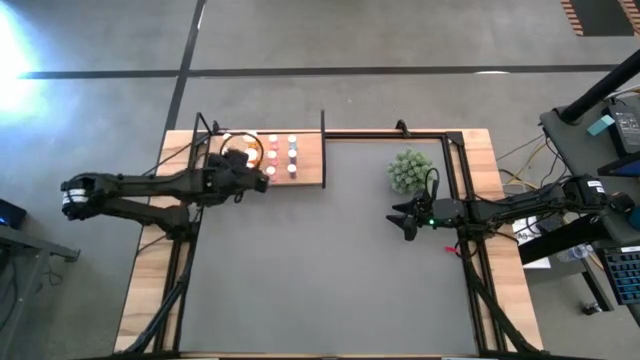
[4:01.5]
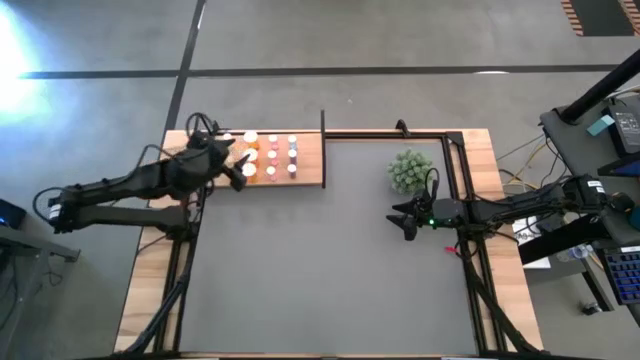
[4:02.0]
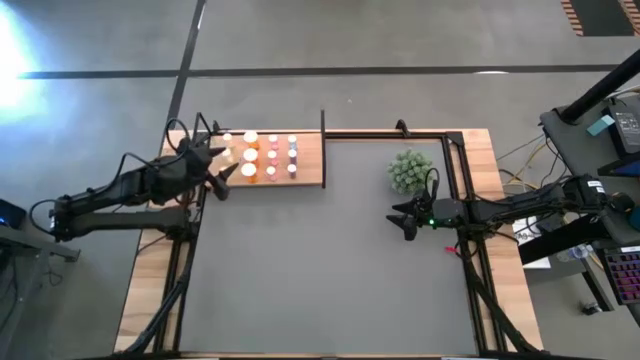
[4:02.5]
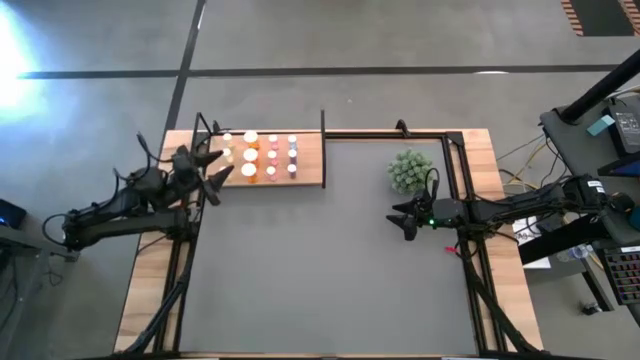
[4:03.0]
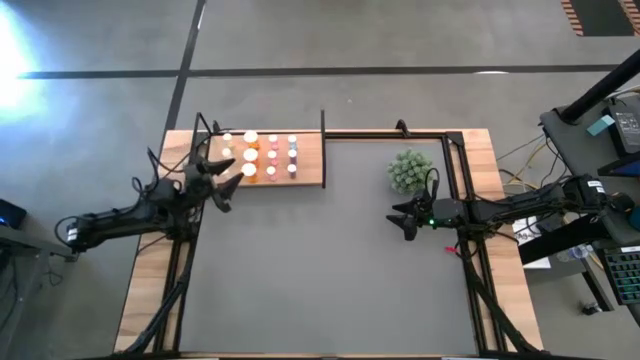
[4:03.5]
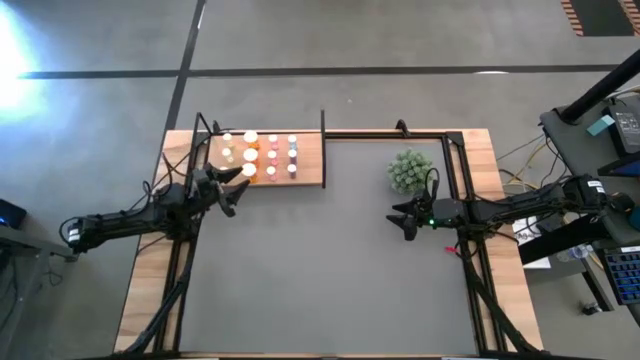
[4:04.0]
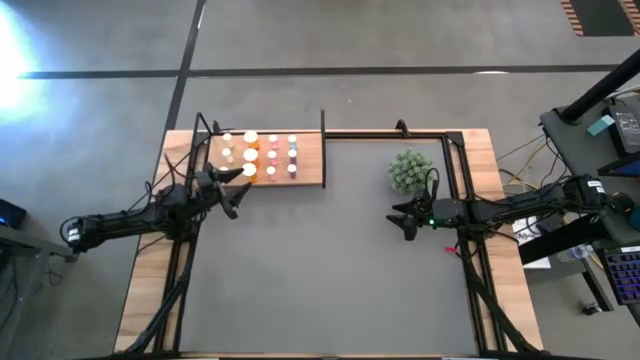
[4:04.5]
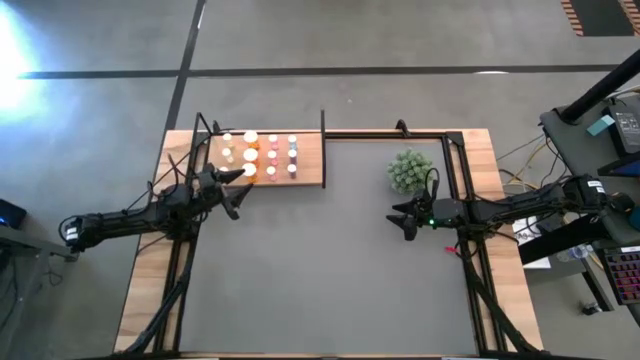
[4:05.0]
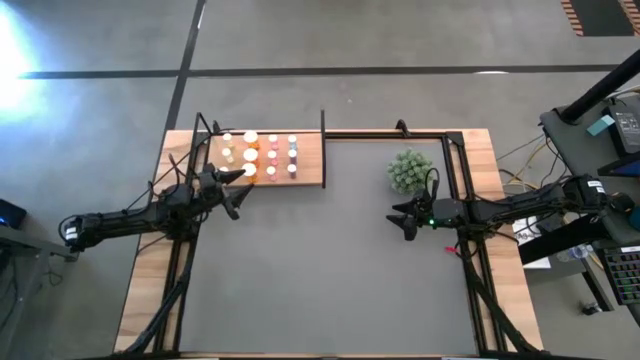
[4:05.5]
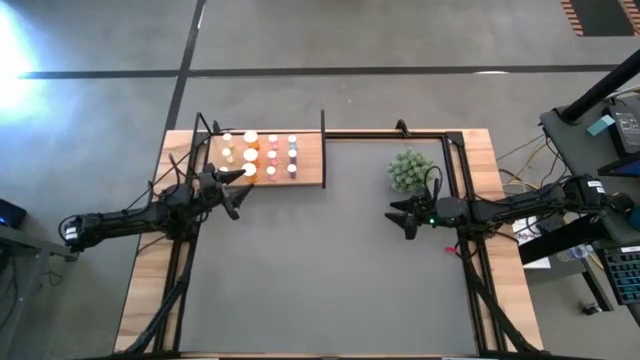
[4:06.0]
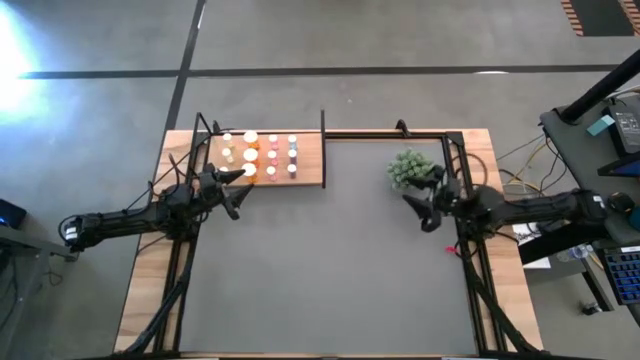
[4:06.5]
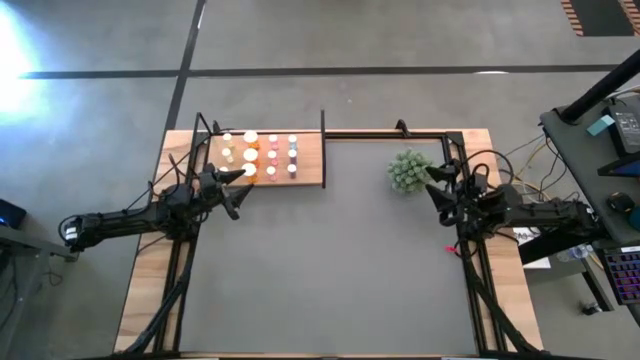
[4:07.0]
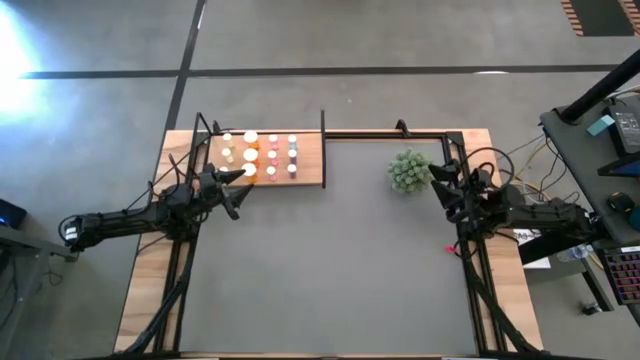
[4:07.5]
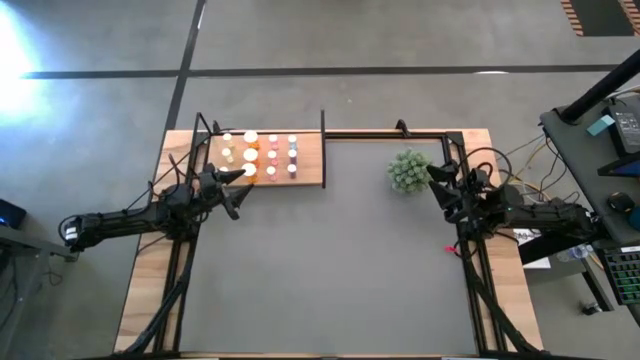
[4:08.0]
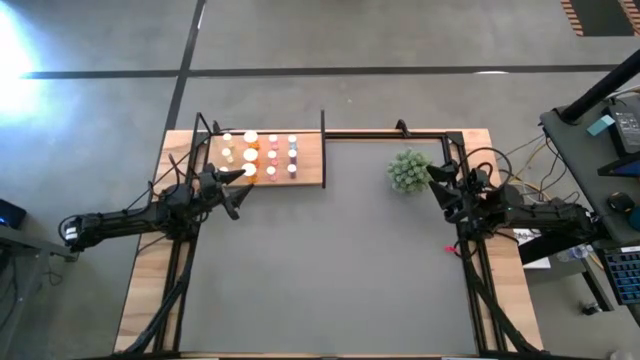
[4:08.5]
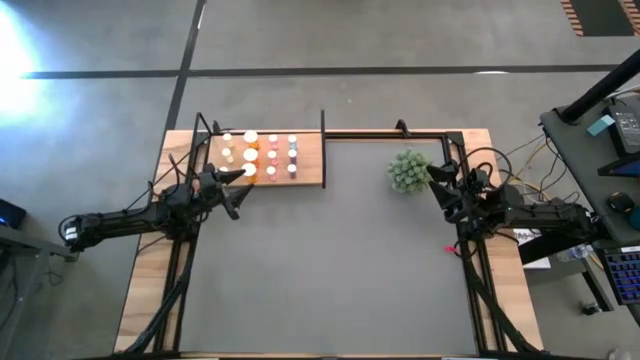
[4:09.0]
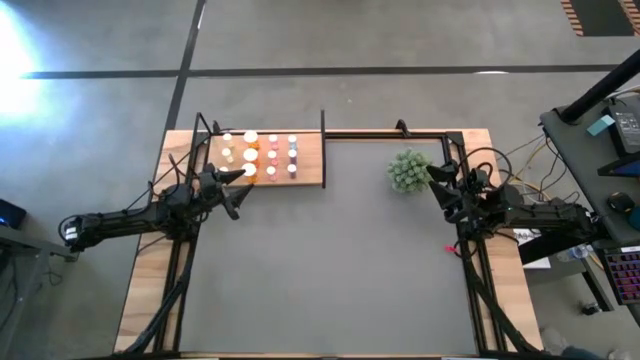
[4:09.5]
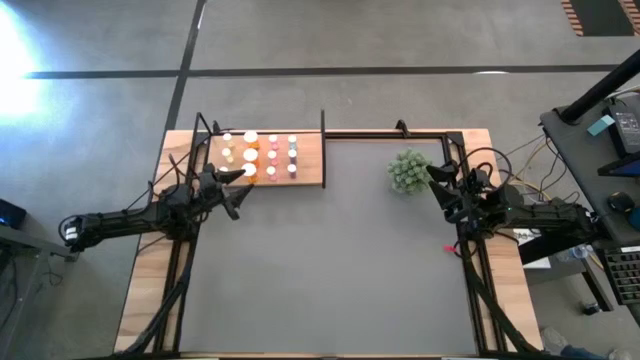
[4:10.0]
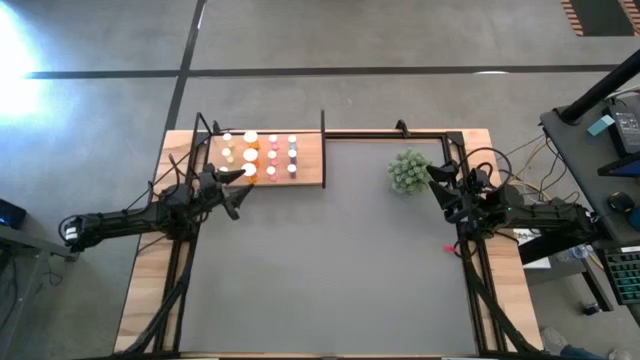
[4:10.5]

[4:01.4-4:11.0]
Task: Pick and place medicine bottles onto shelf by color
Return to Home Position

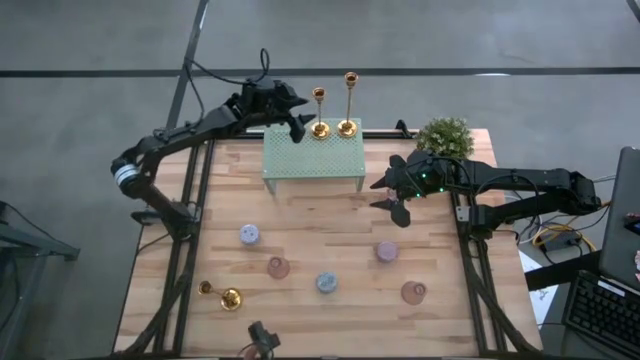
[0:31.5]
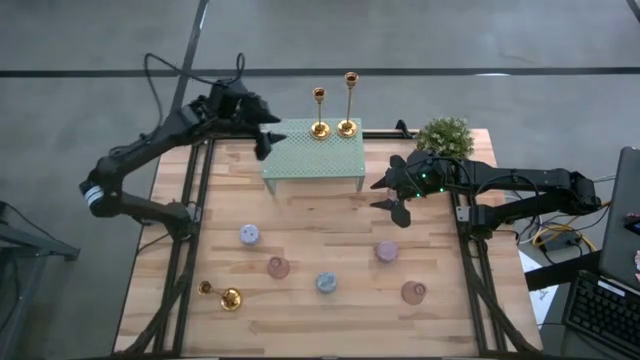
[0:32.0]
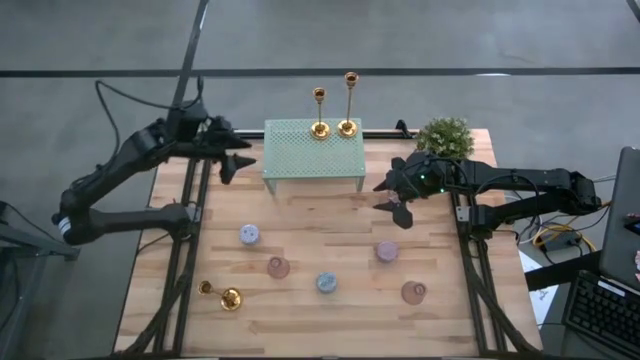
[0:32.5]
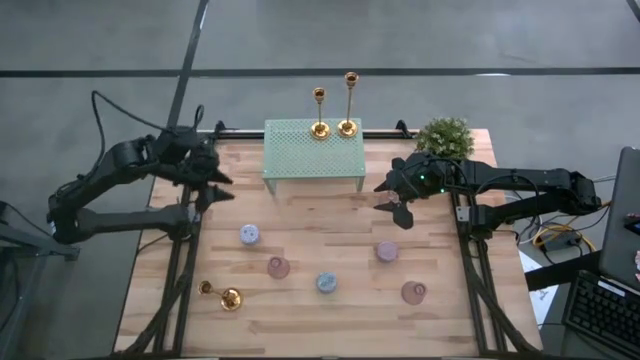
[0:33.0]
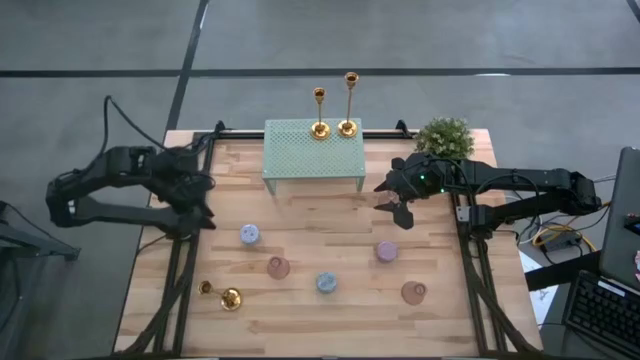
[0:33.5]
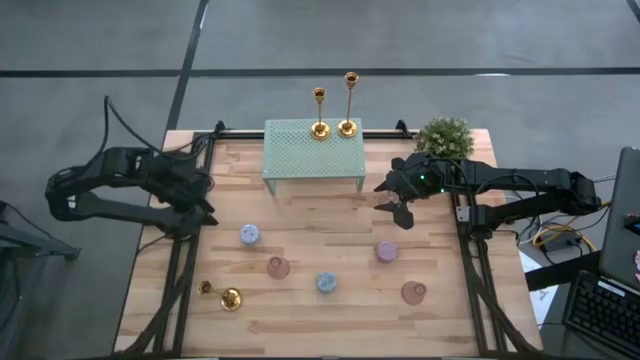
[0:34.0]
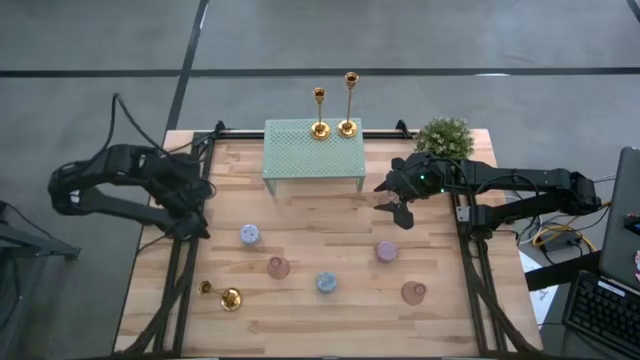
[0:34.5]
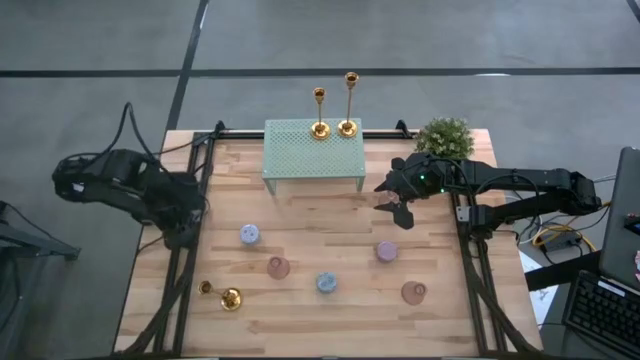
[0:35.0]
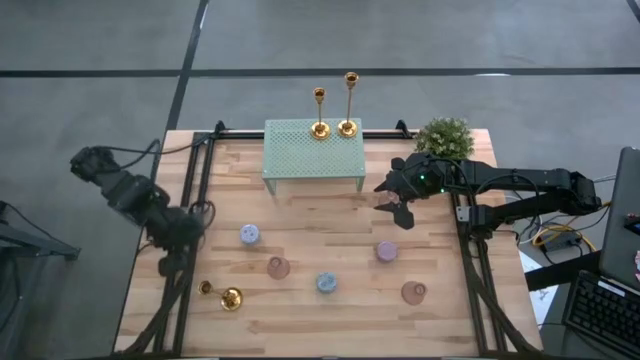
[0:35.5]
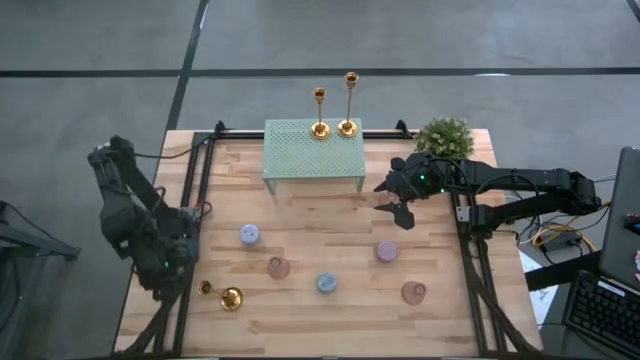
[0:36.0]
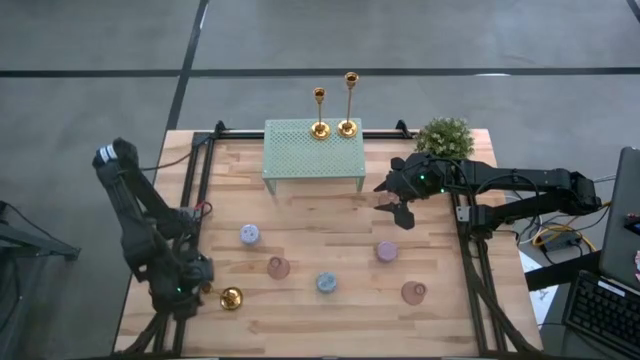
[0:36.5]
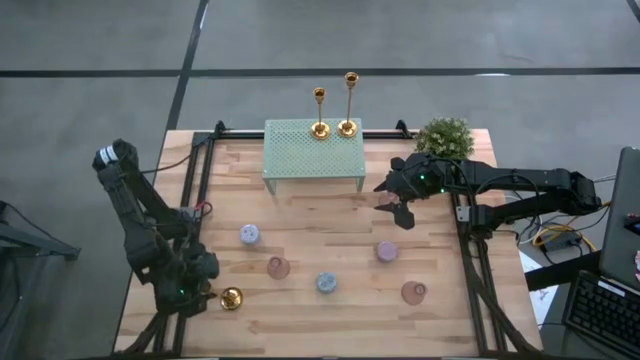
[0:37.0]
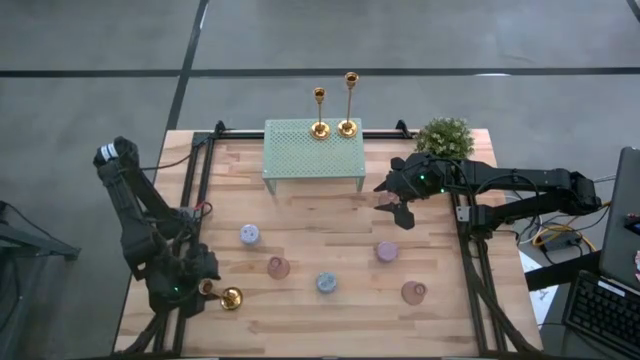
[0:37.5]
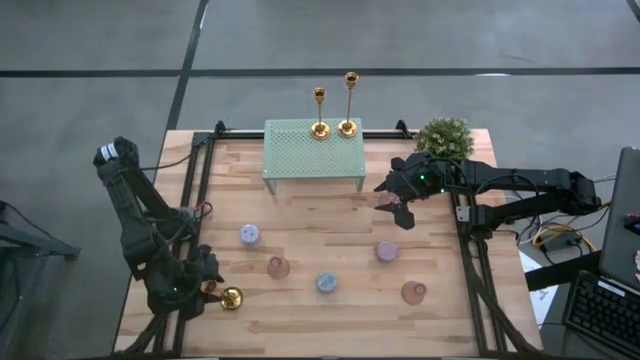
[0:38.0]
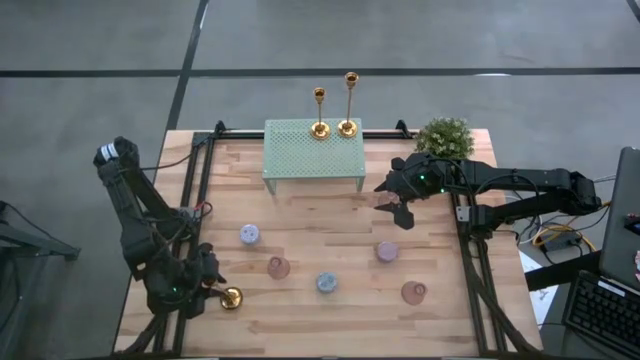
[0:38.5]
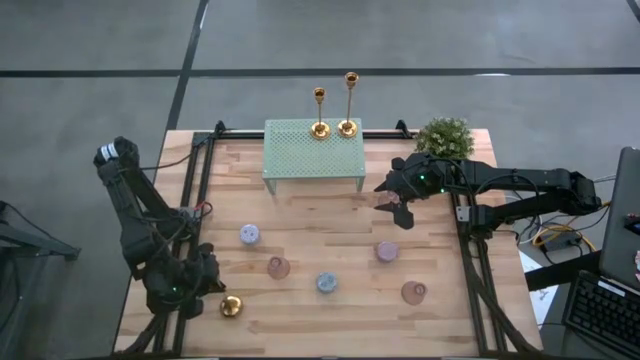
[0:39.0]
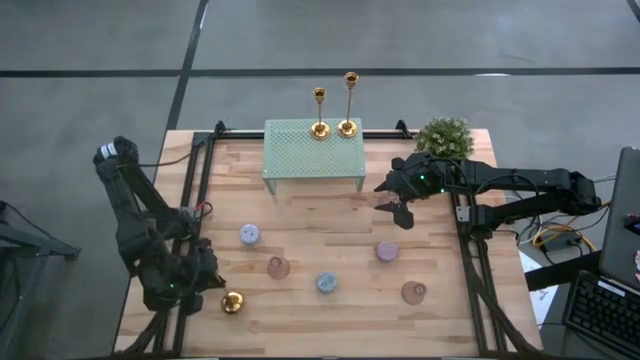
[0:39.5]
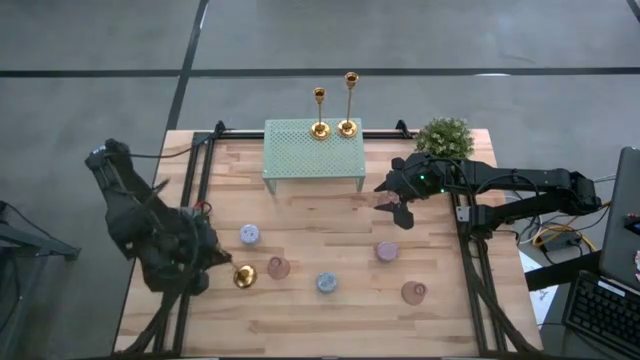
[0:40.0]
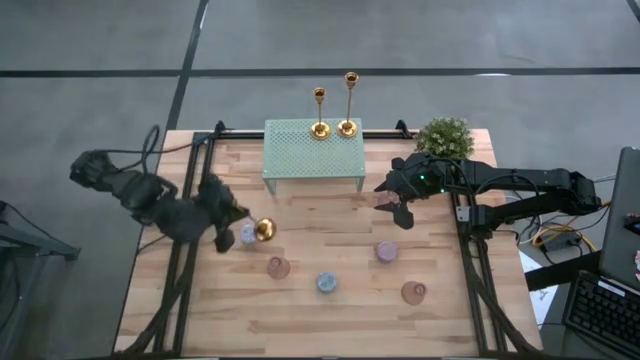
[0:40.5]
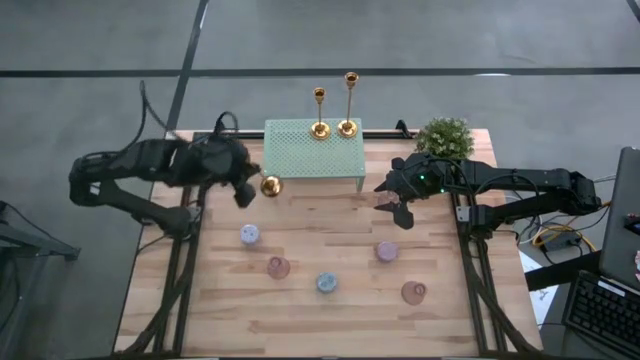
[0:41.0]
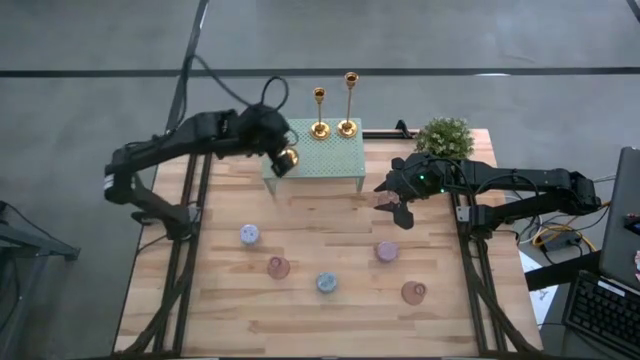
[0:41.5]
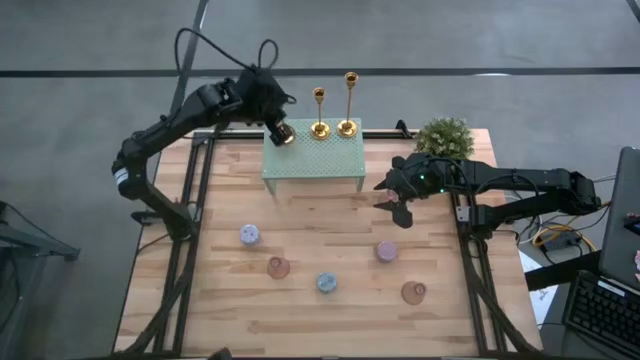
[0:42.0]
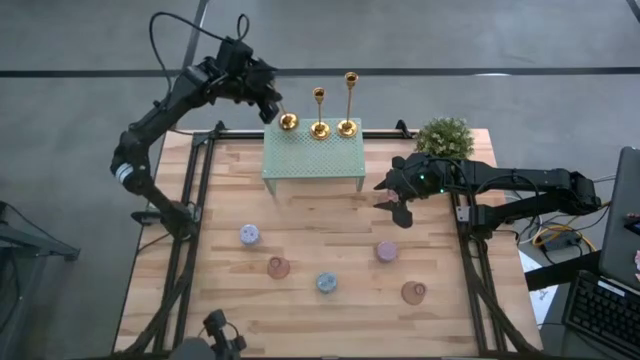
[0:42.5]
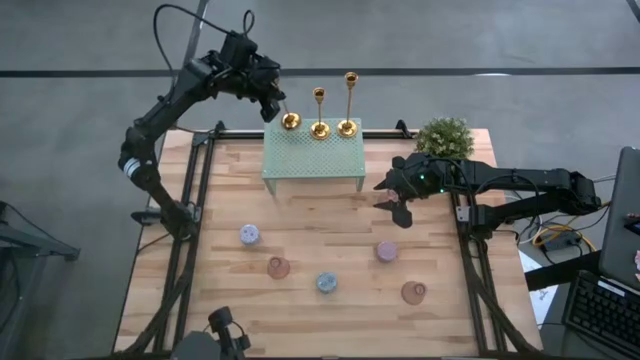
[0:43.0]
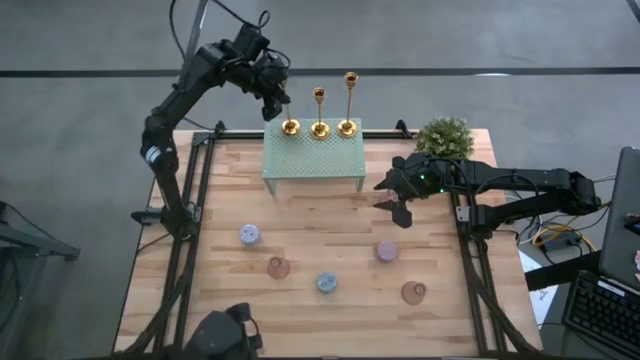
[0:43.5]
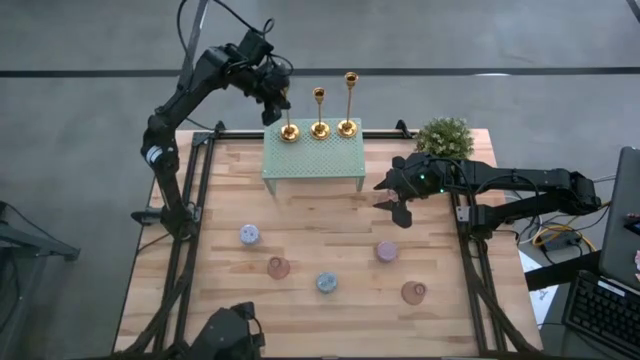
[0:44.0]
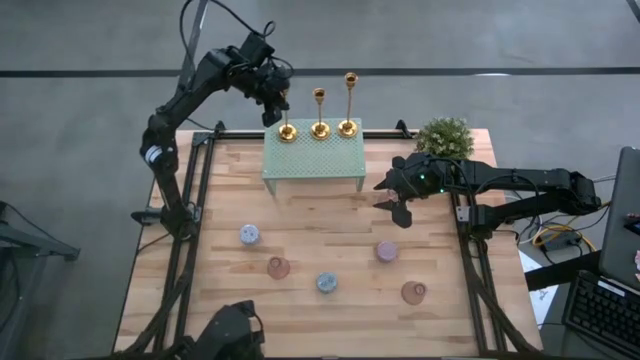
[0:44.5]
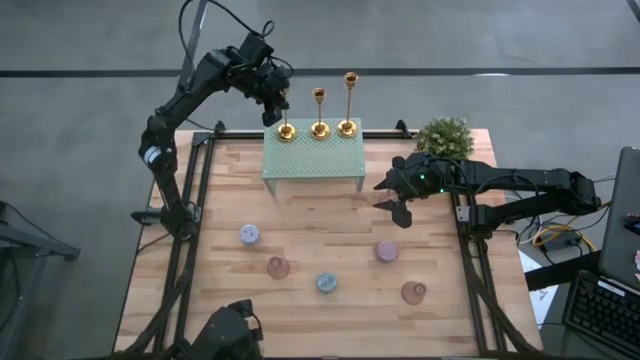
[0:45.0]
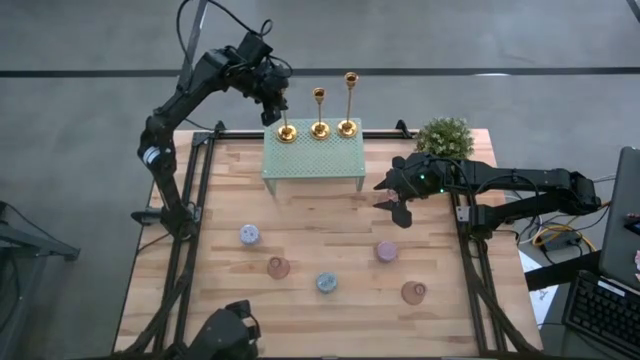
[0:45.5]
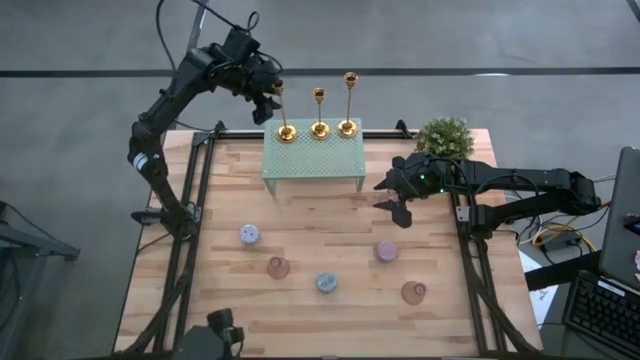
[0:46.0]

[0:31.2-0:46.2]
Task: Pick & Place candle stick holders
Put the gold candle holder on the shelf
